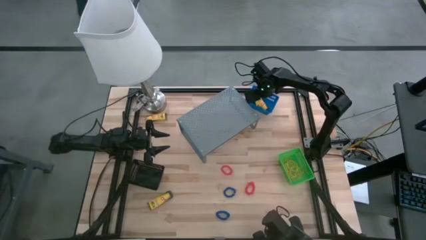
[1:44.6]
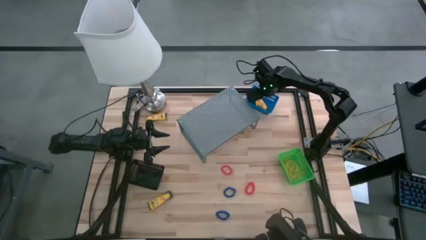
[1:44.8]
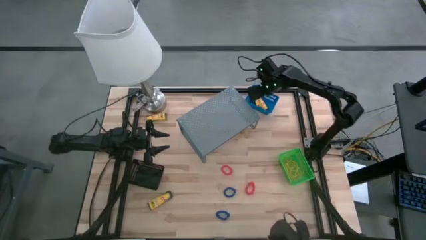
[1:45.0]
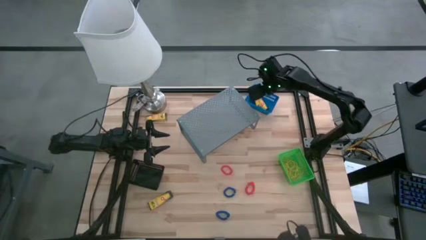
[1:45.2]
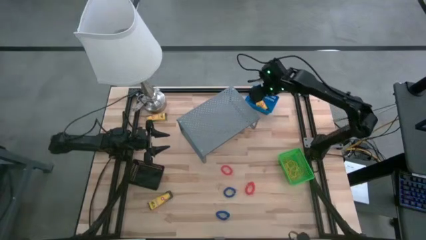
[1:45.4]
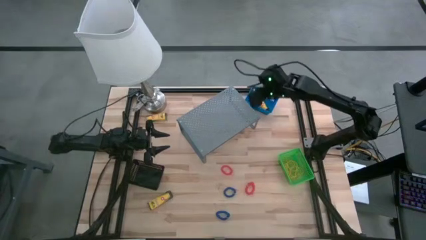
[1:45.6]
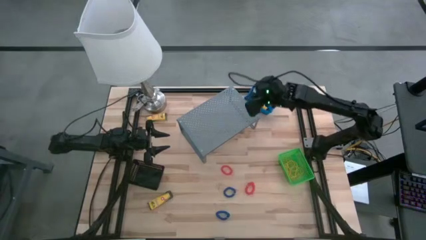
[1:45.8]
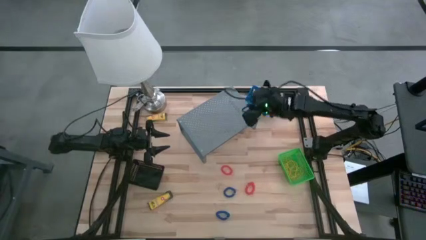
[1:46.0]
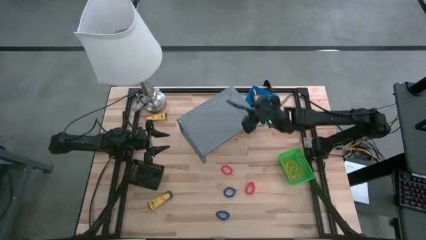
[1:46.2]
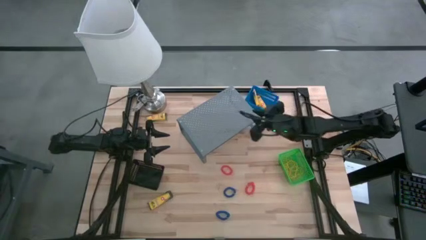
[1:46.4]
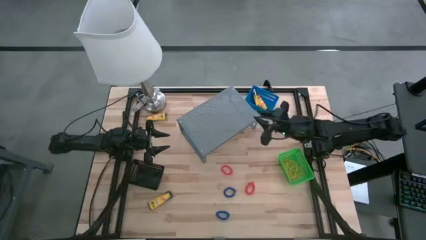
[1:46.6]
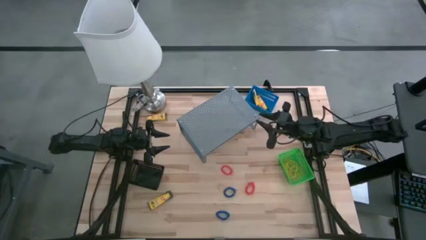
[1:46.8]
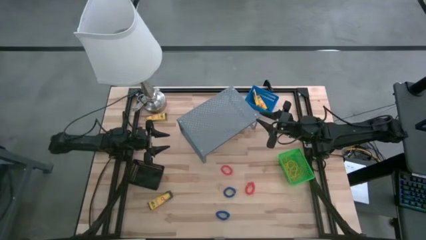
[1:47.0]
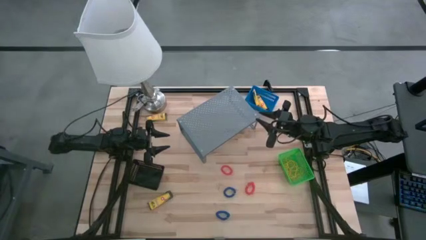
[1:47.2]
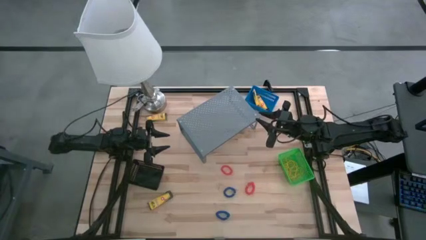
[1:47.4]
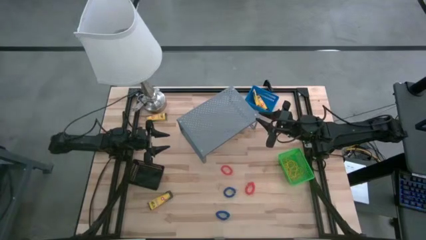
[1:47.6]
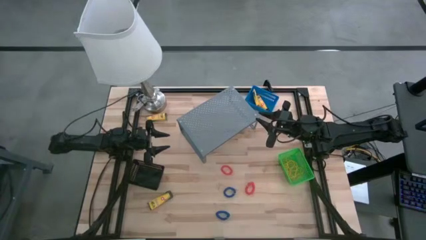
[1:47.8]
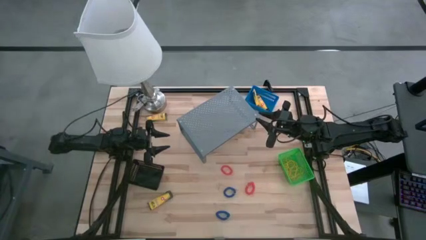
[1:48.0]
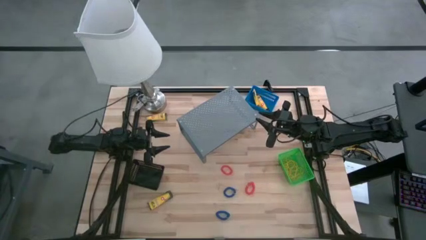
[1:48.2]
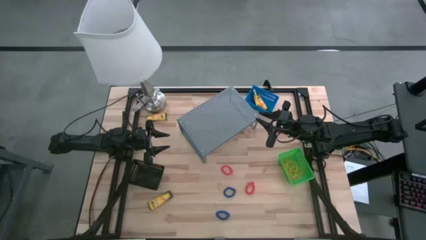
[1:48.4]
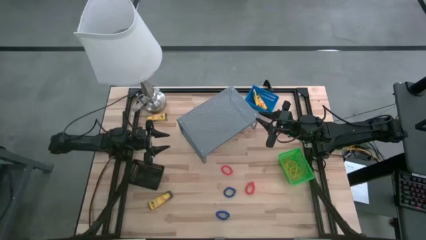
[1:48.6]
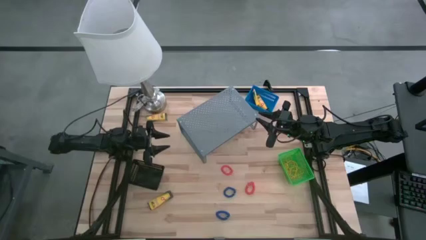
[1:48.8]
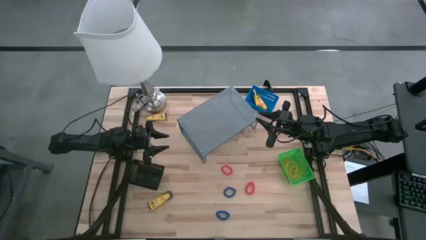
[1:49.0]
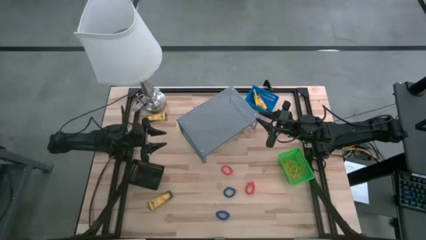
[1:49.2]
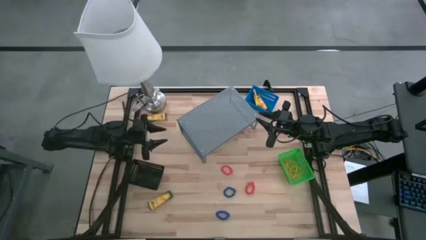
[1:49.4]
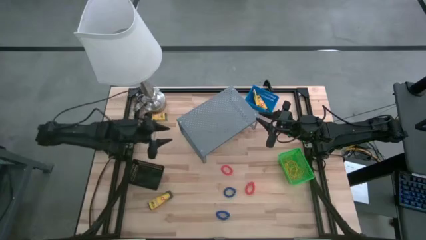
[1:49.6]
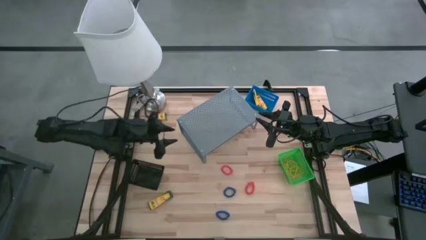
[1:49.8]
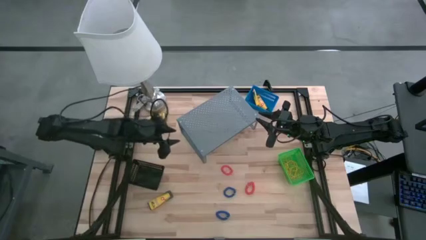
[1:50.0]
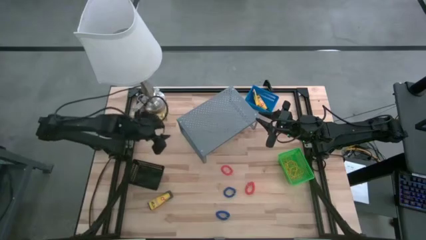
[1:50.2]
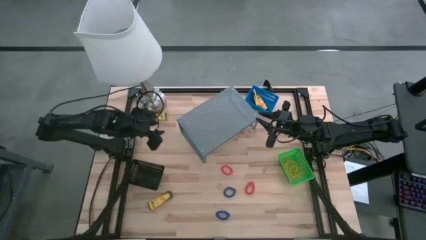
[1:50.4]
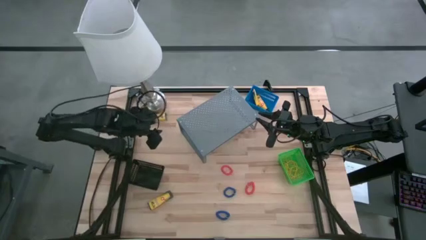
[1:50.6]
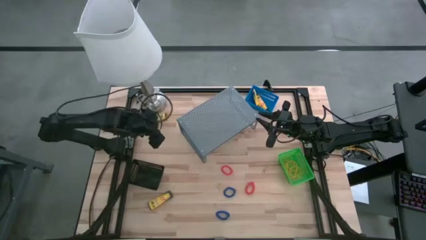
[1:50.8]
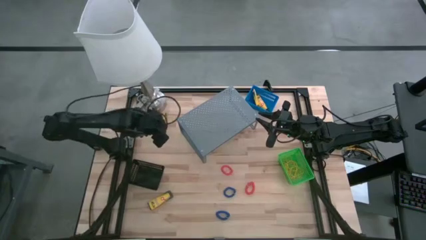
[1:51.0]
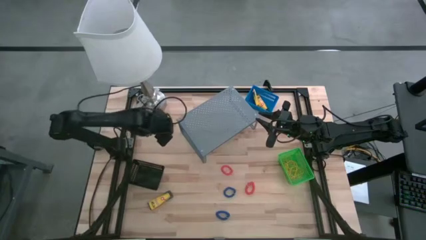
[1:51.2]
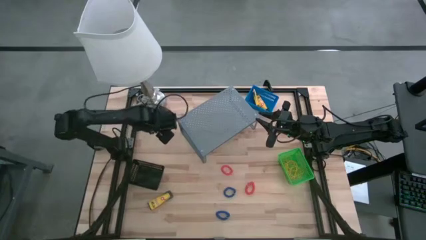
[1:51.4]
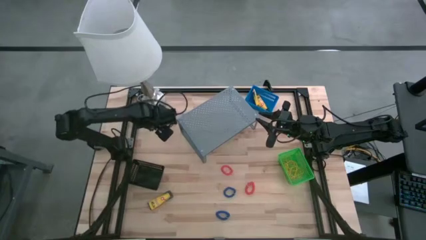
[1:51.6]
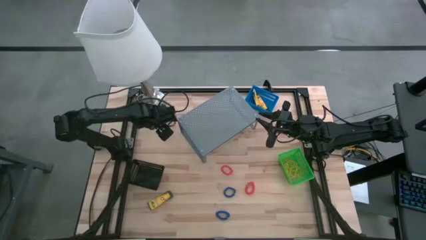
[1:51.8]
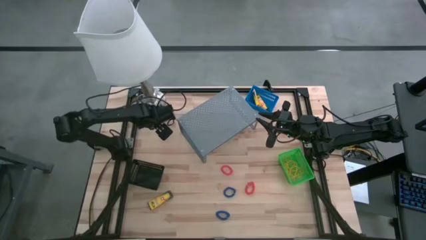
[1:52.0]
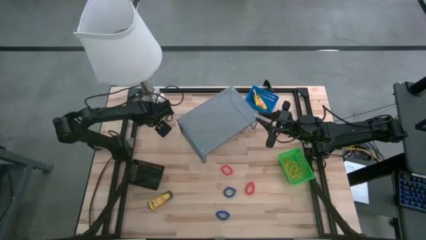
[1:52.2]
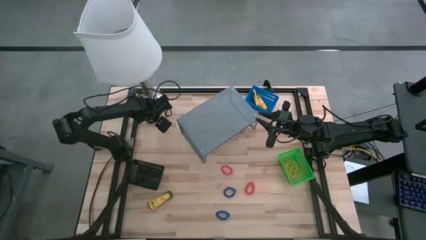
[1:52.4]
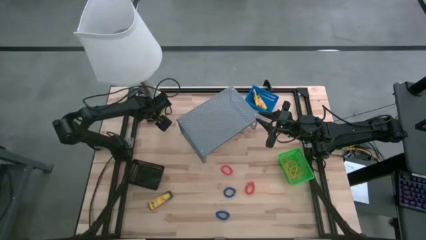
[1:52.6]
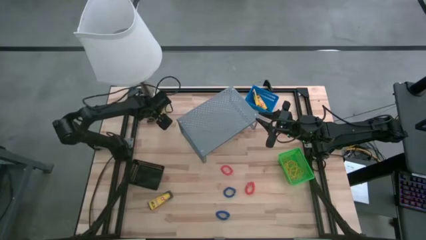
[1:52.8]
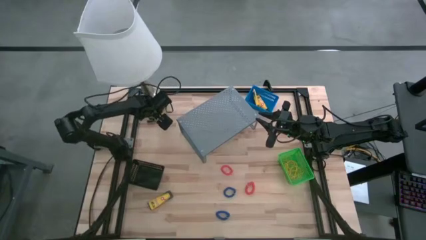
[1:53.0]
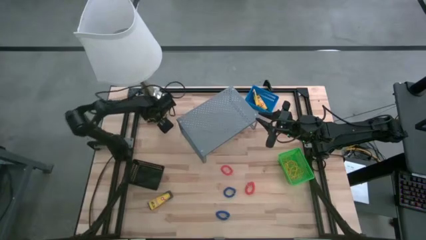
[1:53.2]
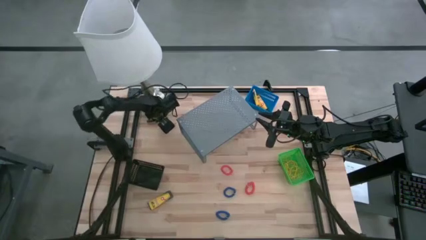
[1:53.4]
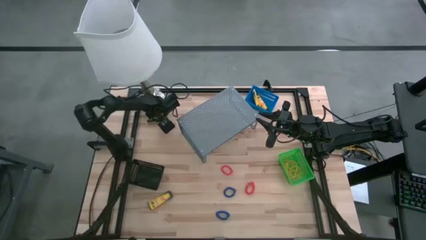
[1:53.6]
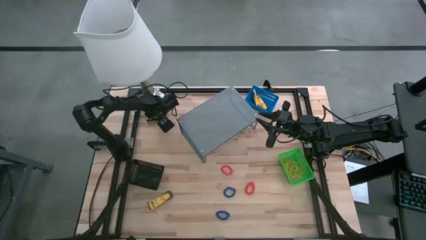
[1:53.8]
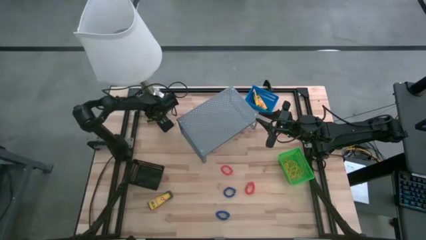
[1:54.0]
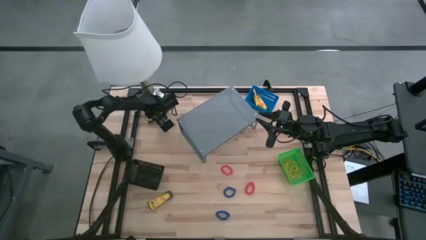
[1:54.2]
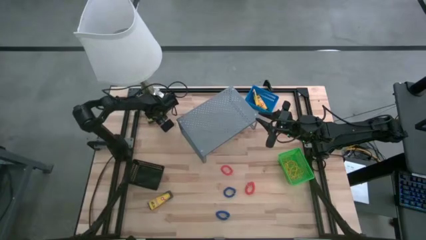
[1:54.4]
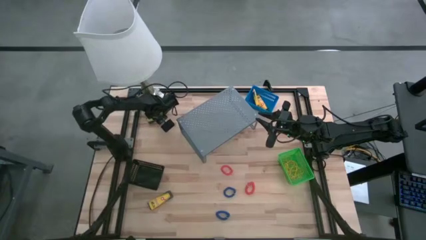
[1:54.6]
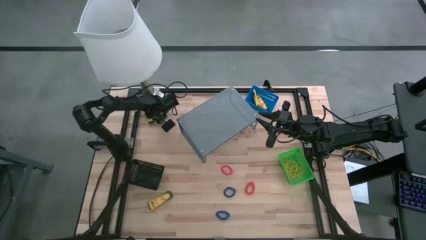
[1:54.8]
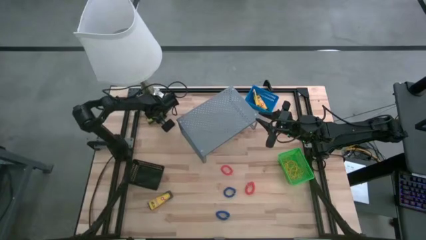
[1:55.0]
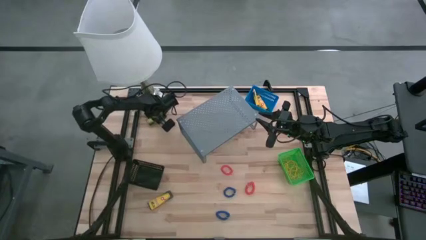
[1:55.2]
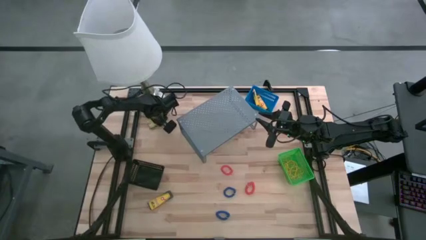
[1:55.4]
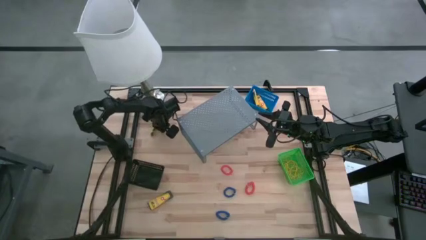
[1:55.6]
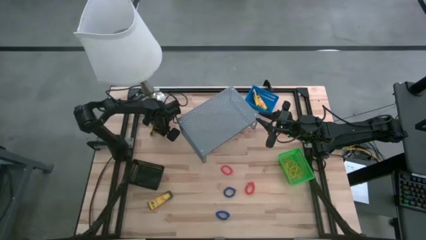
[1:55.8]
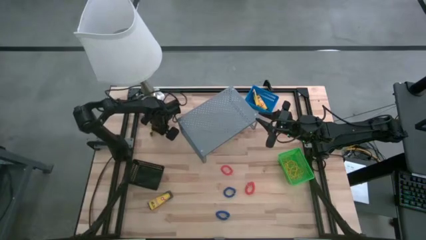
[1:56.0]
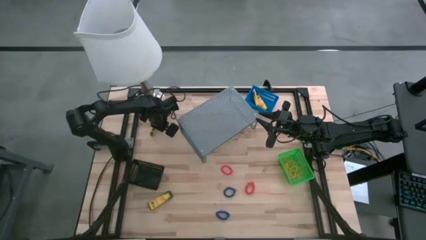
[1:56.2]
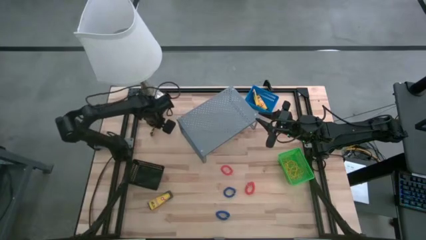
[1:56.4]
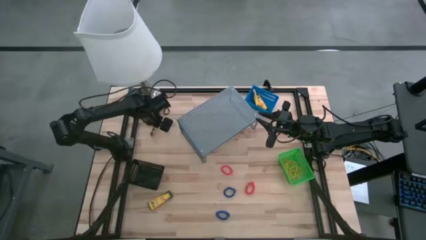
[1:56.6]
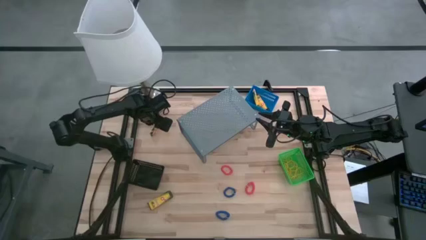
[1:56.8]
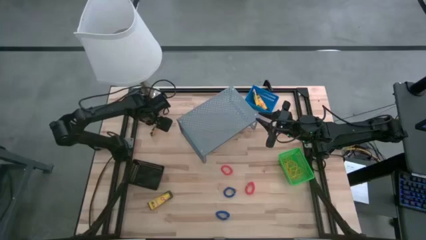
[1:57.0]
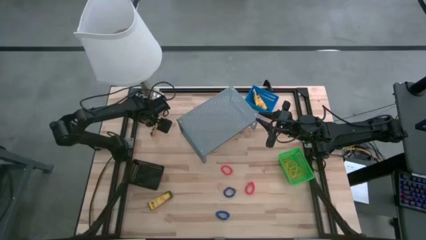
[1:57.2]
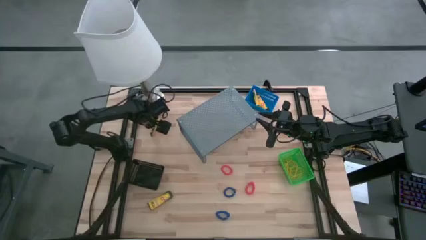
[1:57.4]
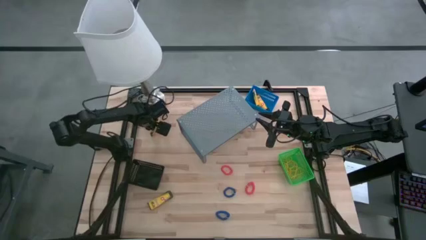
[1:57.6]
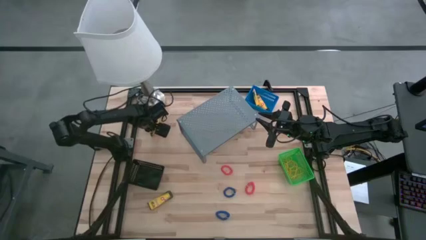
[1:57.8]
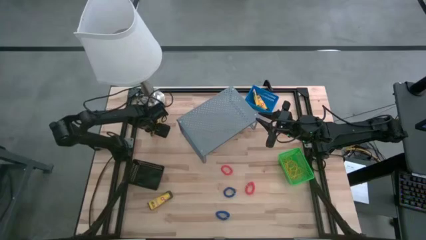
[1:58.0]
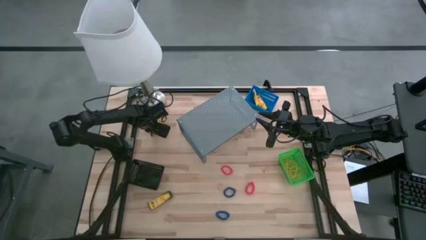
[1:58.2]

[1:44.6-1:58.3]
Task: Pick & Place Office Desk Supplies
Put the crayon box into the blue basket
